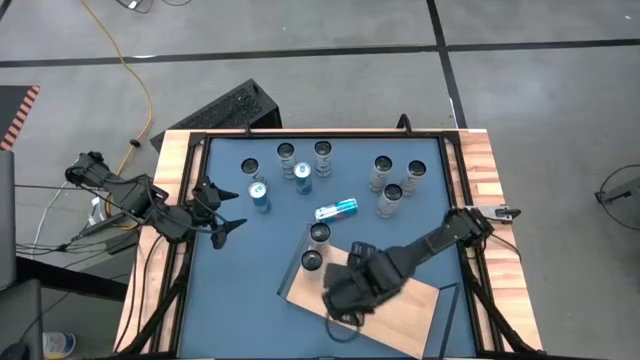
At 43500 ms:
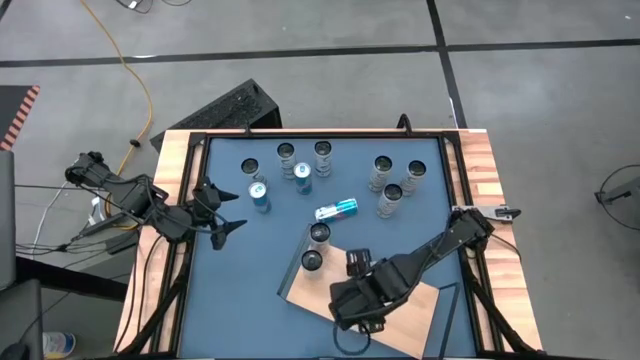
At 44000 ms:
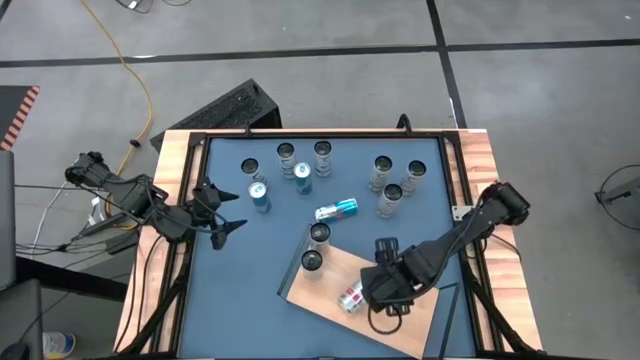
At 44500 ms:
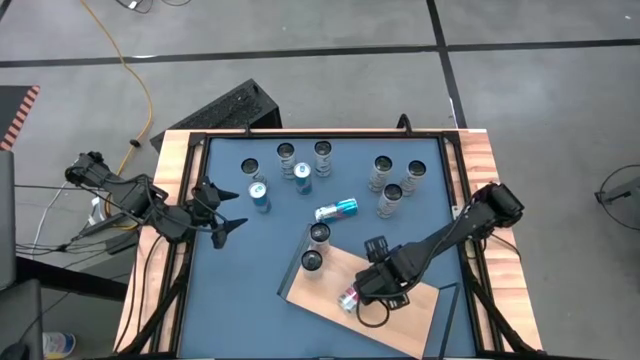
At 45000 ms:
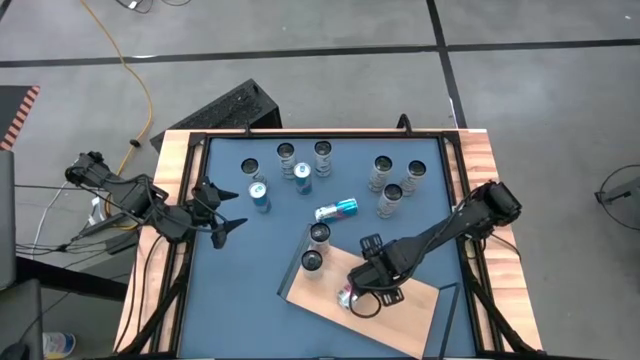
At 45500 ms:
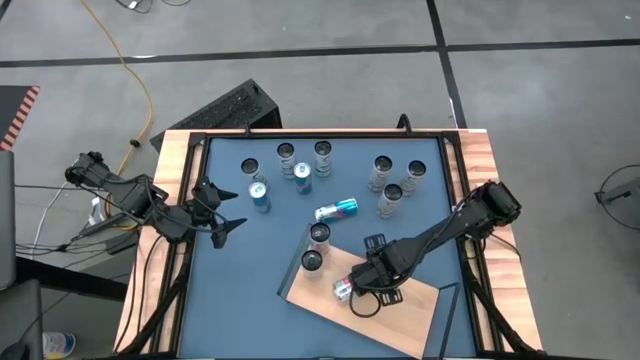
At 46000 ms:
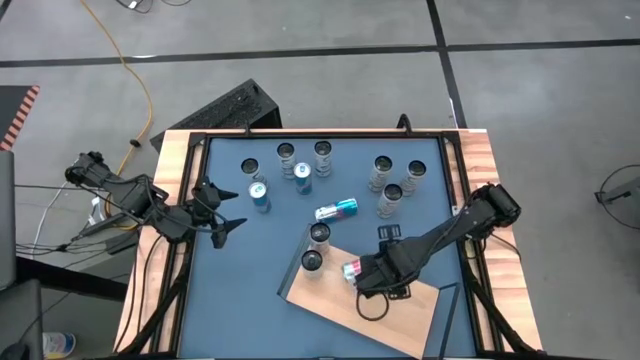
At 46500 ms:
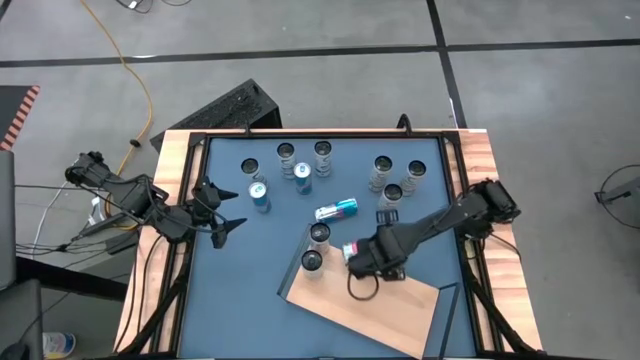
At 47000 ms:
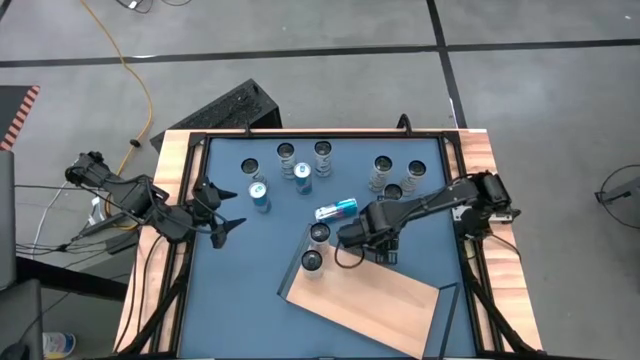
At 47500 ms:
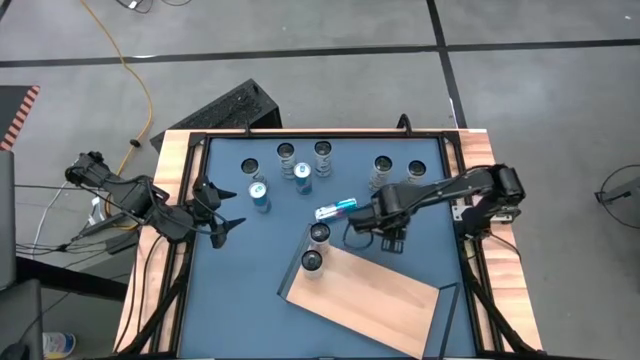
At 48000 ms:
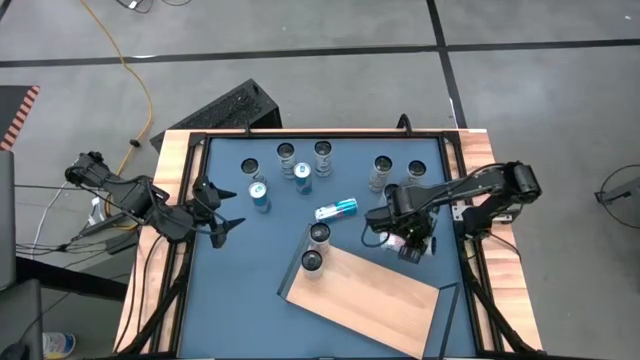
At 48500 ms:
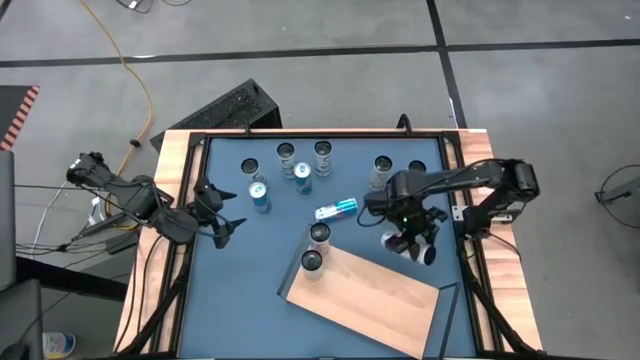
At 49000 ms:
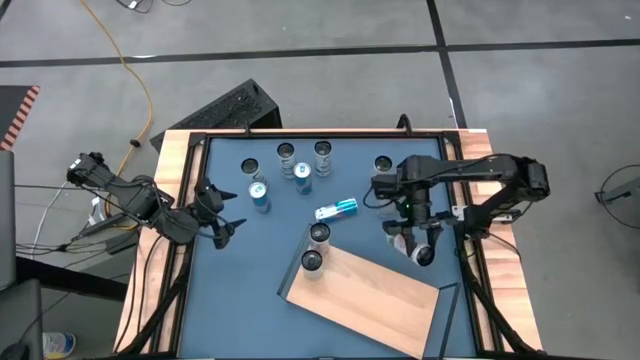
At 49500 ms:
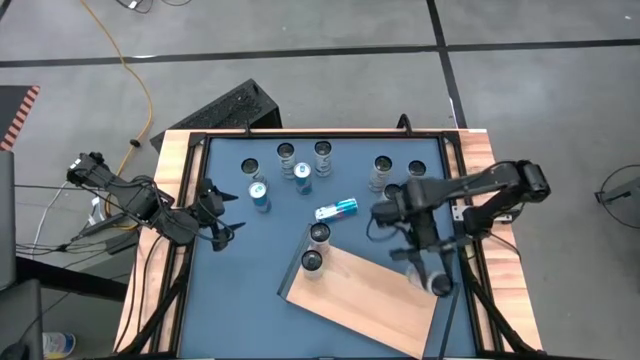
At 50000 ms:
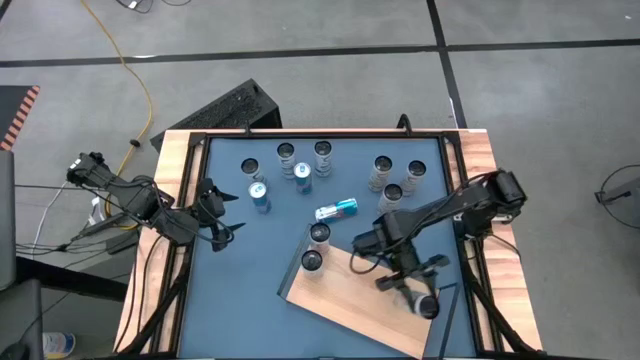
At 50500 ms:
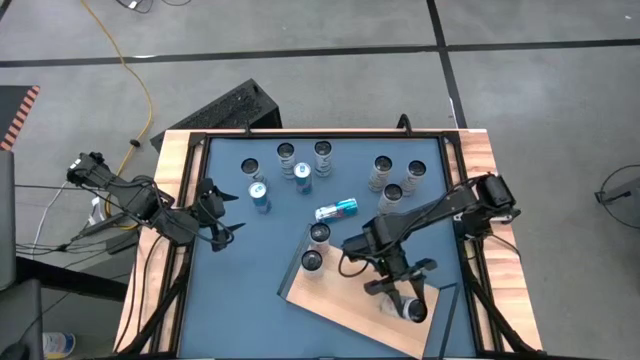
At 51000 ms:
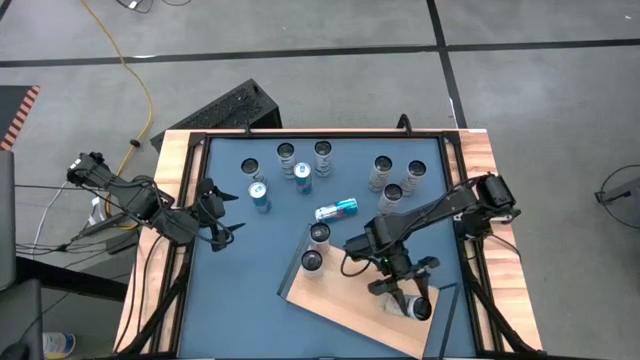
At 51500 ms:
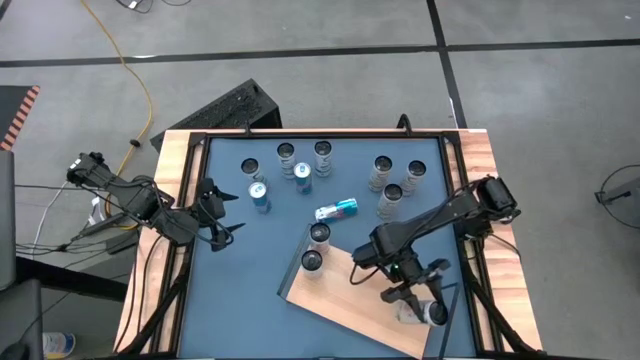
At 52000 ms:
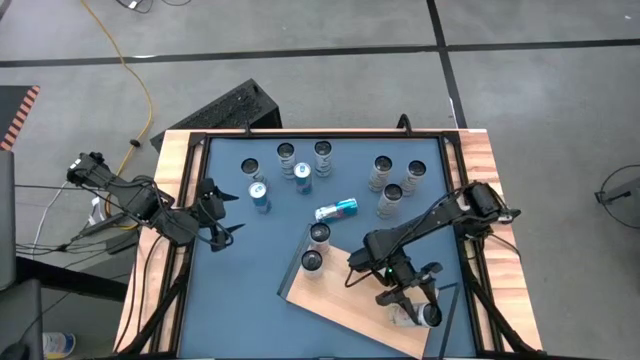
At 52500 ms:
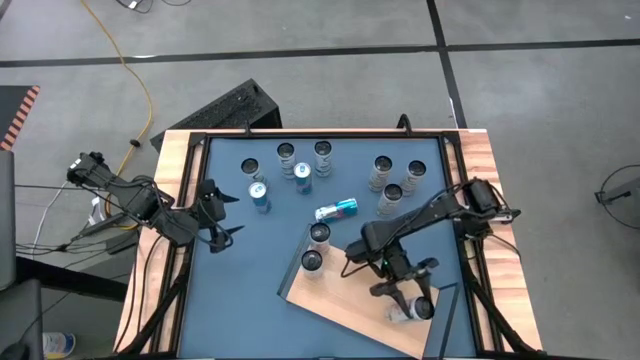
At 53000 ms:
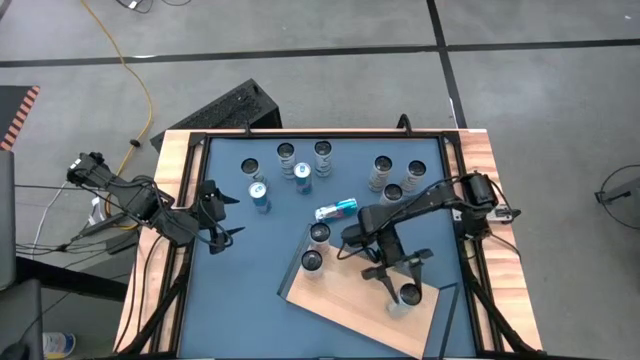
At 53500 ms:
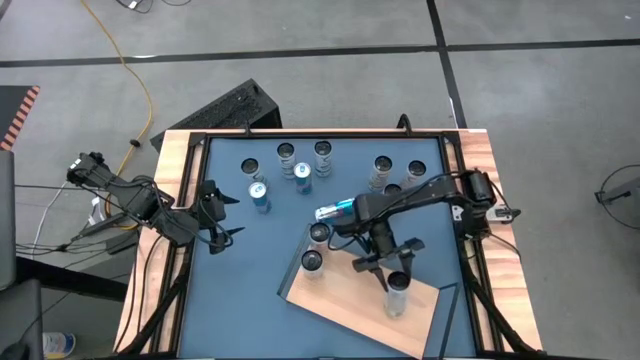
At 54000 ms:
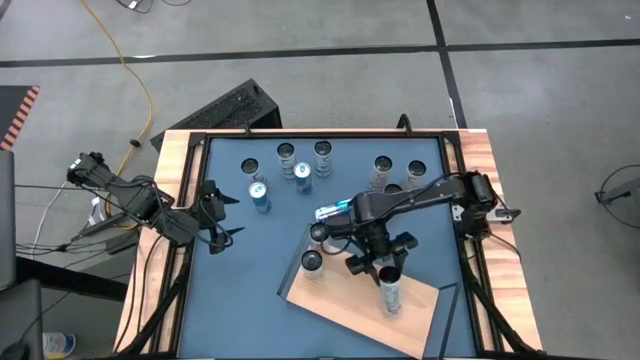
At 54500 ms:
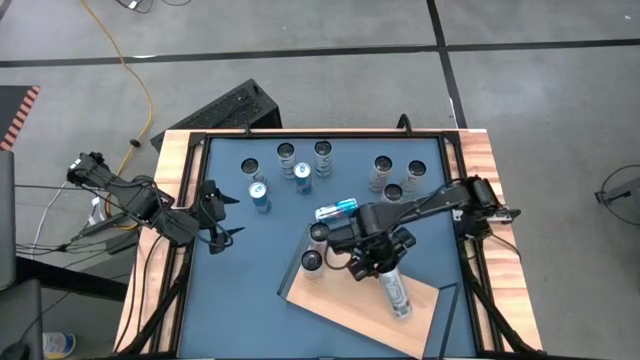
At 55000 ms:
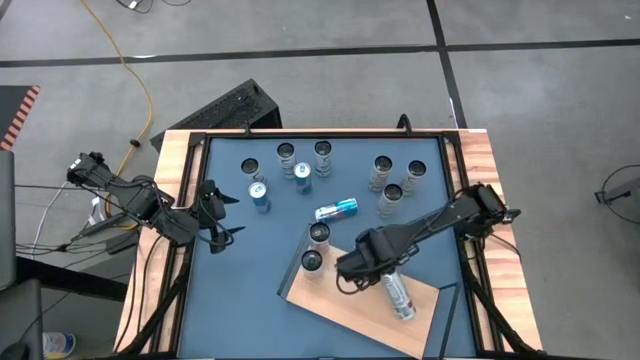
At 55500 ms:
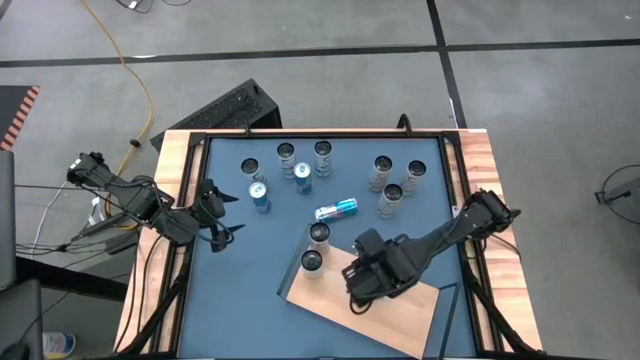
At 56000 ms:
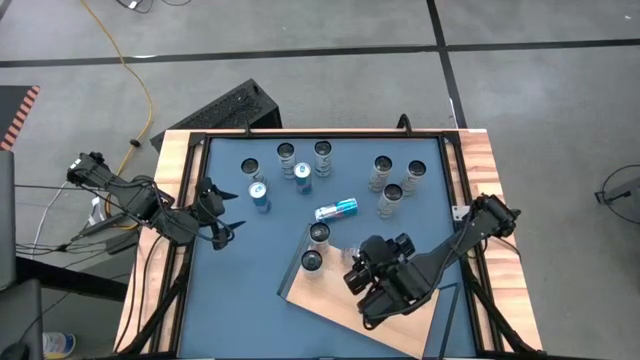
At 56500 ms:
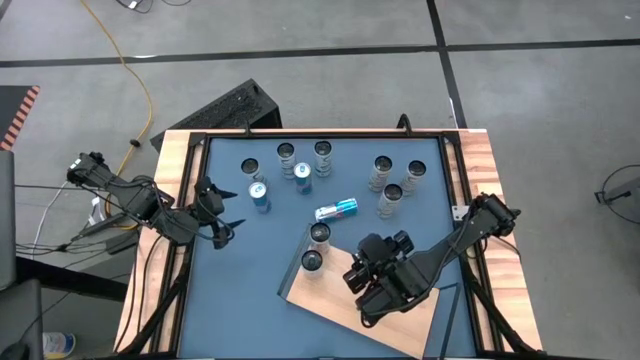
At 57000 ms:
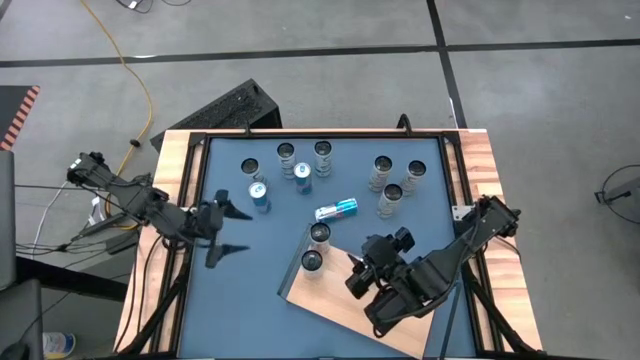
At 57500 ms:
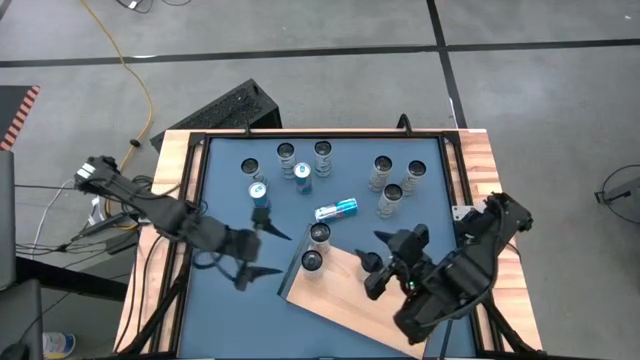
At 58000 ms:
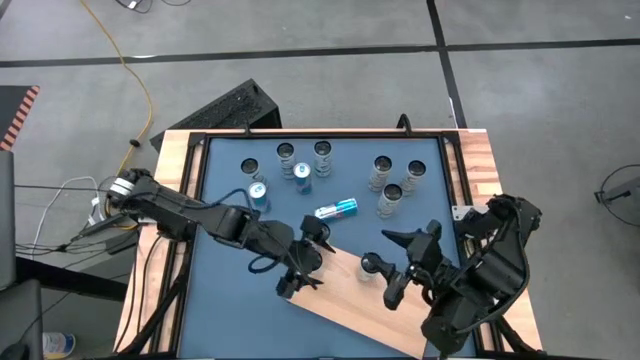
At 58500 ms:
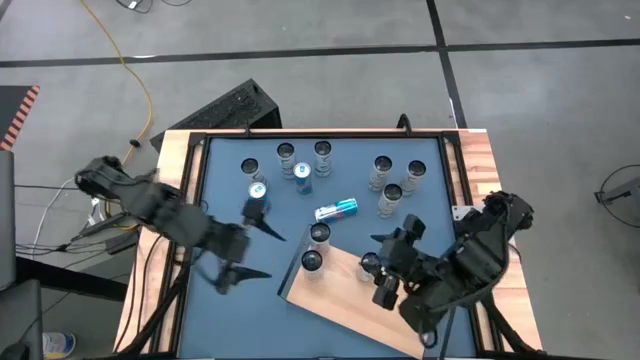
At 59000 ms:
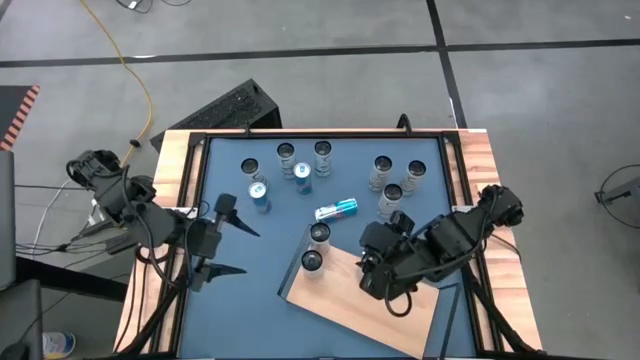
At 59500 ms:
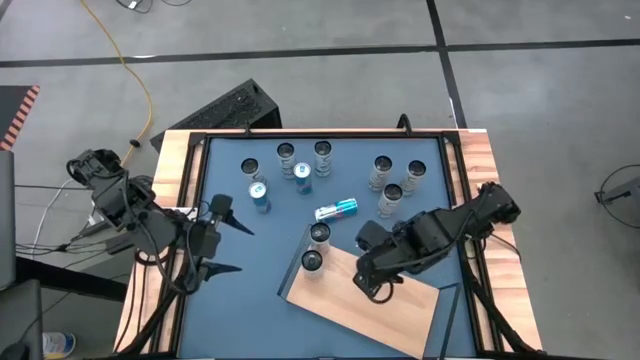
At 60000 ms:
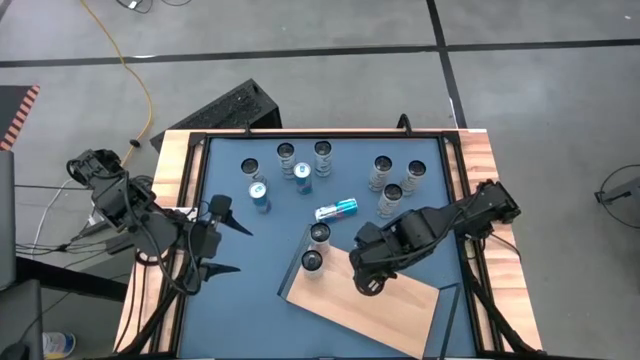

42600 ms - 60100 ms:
Task: Place canned beverage on shelf
Put the white pink soda can aligned with the other white pink soda cans on the shelf

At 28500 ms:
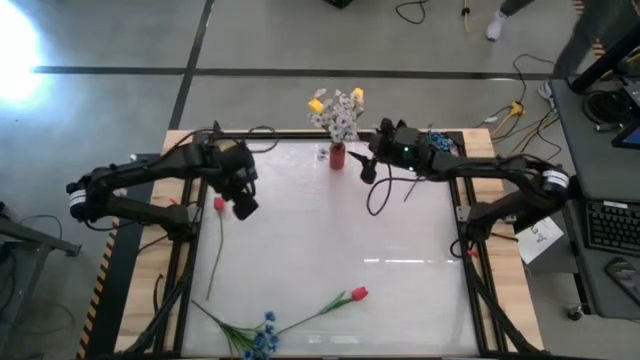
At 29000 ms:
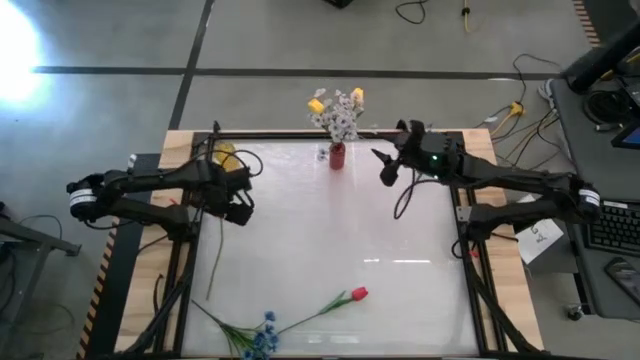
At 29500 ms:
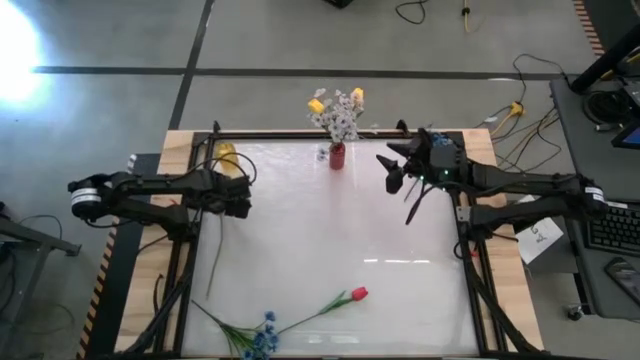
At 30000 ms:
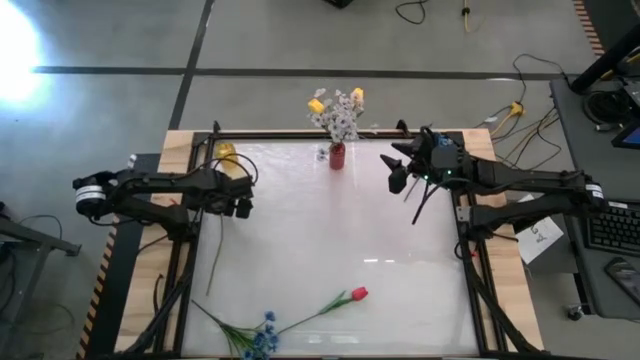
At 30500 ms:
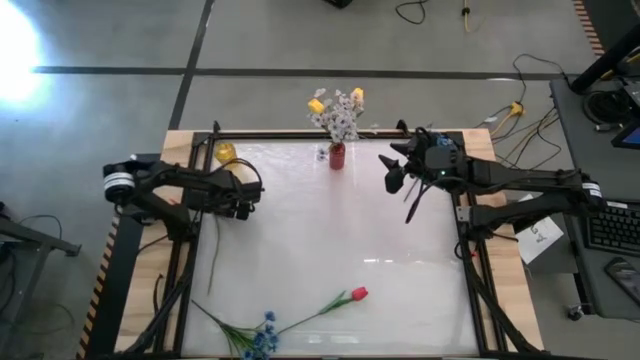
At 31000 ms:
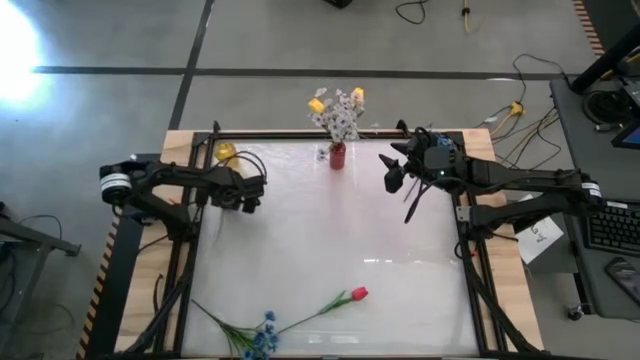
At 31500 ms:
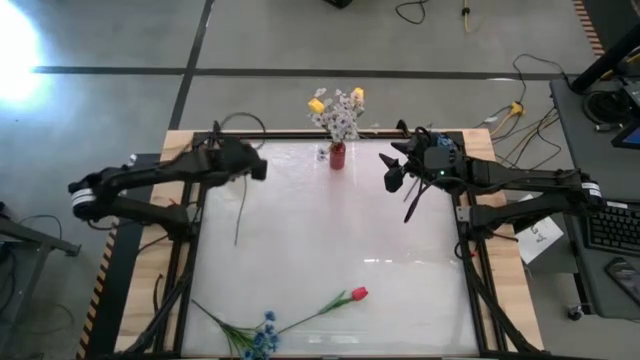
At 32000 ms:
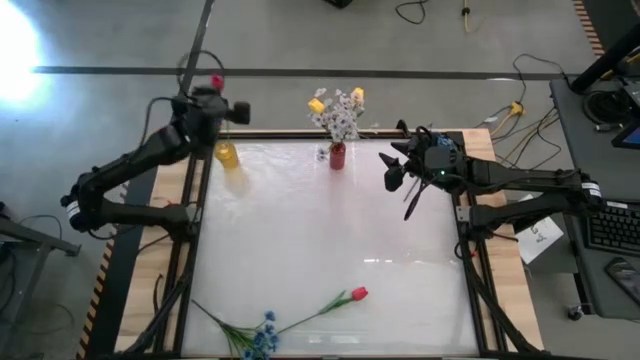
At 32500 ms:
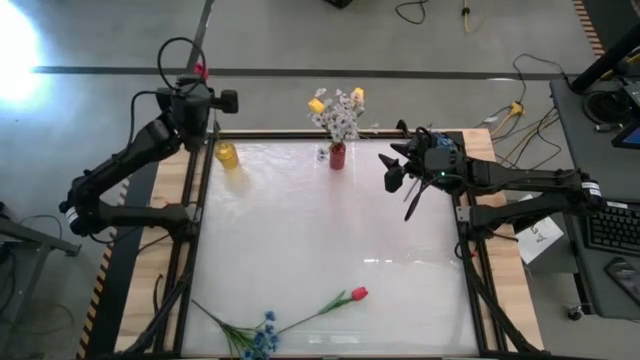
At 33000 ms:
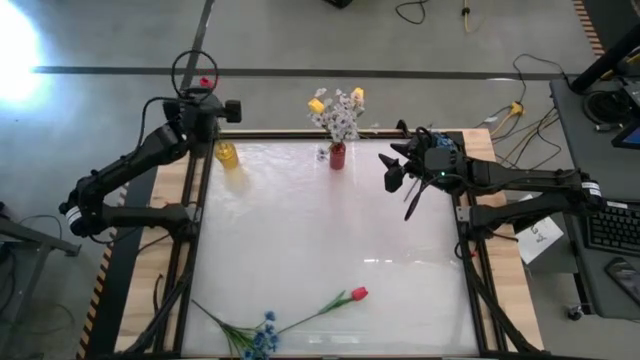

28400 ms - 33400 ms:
Task: Sort flowers into vase by color
Put the top pink flower into the yellow vase
